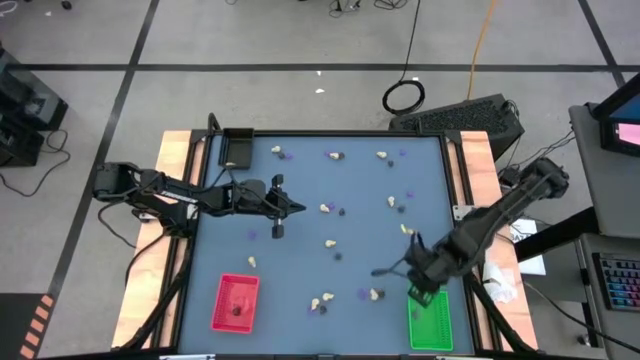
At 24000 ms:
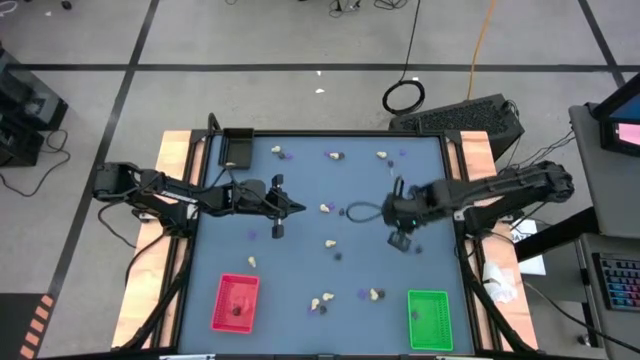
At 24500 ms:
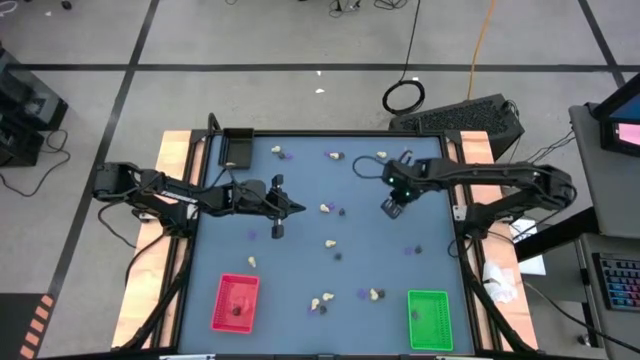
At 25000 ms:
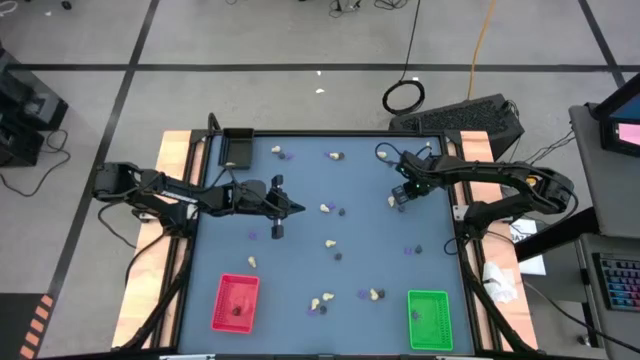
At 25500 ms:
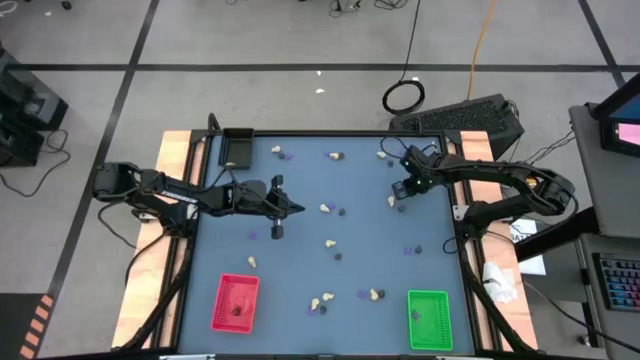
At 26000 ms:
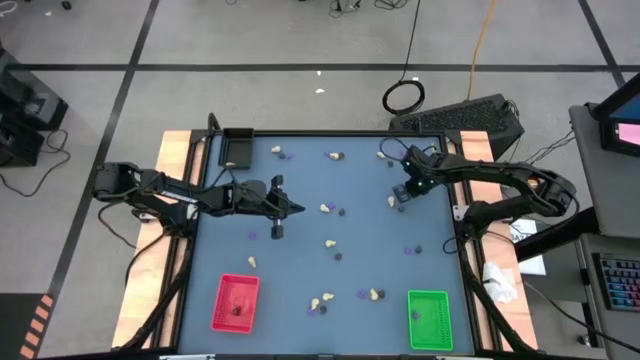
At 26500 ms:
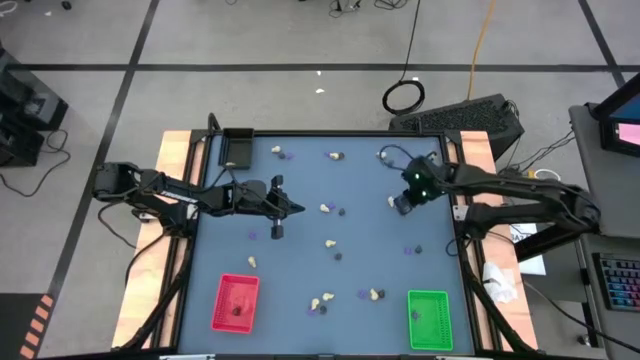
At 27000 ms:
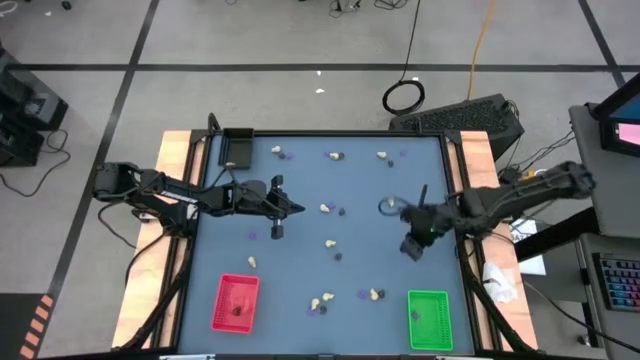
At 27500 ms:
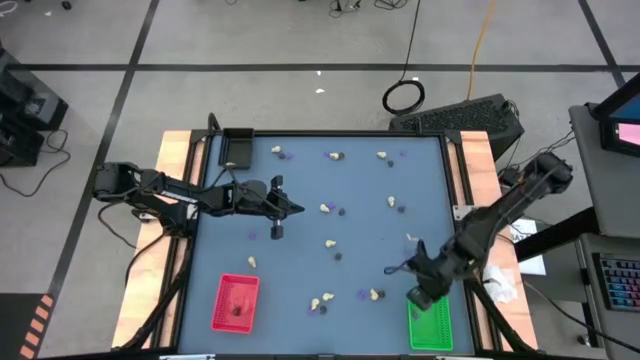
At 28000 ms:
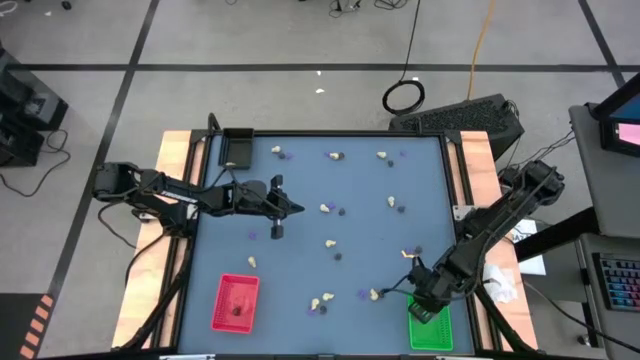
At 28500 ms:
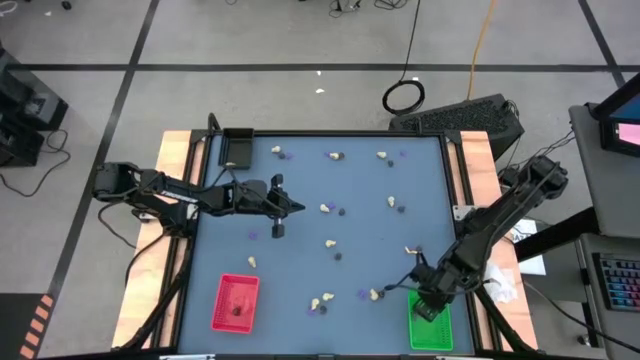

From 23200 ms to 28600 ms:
Task: Sort Halloween decoration
Put the violet spider toy into the green bin

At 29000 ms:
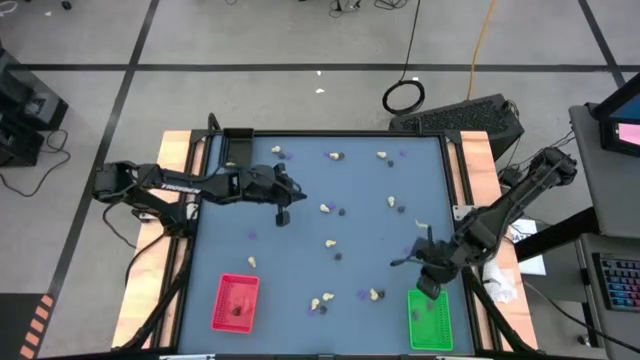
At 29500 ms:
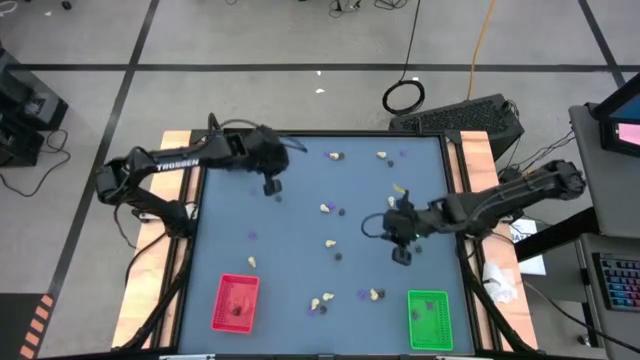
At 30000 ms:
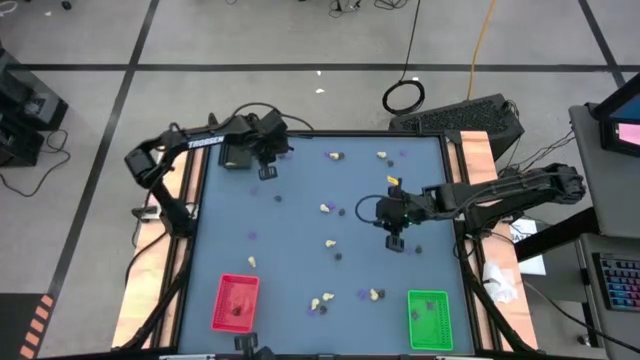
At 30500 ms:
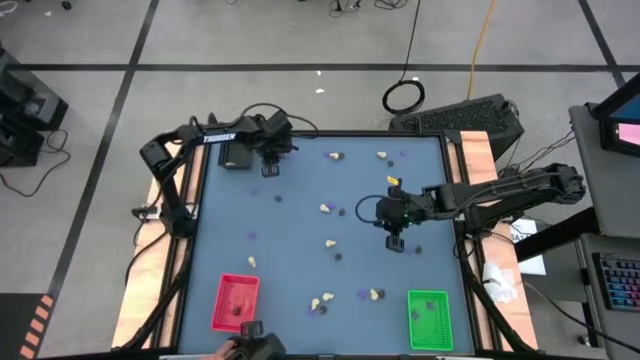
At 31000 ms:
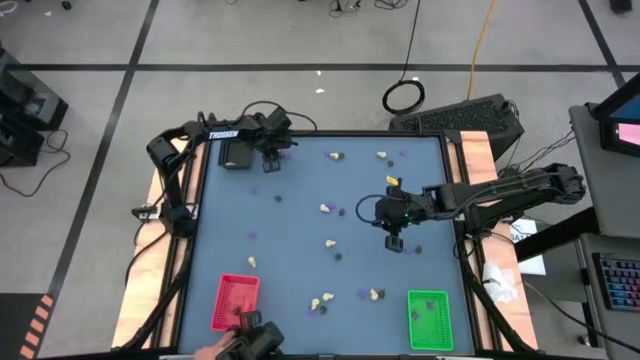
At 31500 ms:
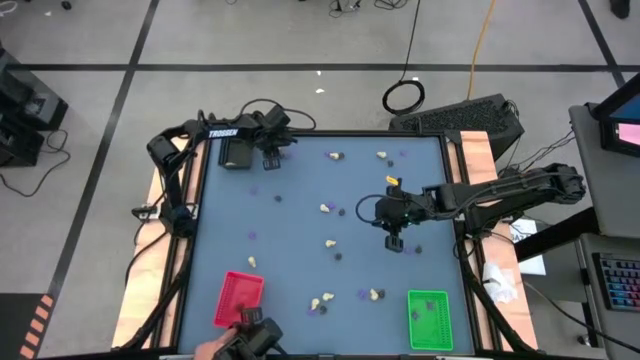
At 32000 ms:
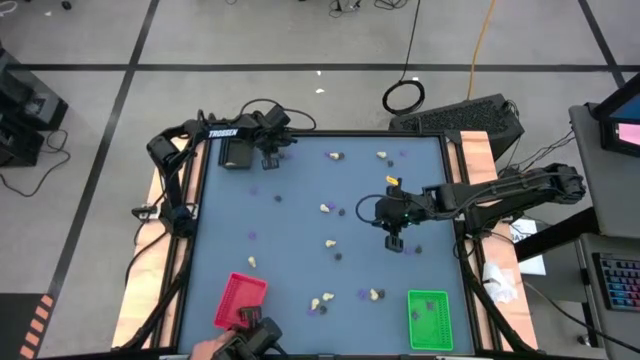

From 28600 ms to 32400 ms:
Put the white skull toy into the black bin

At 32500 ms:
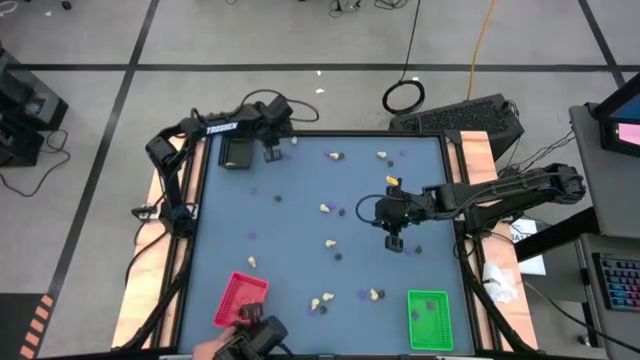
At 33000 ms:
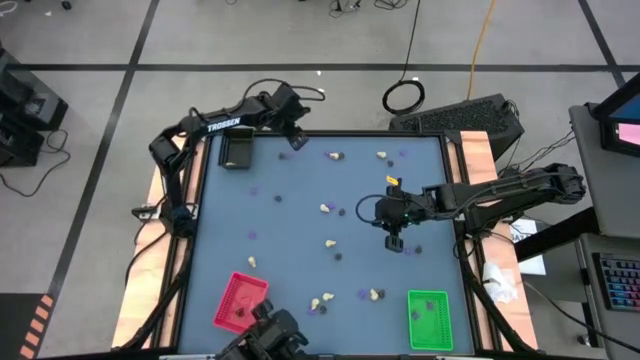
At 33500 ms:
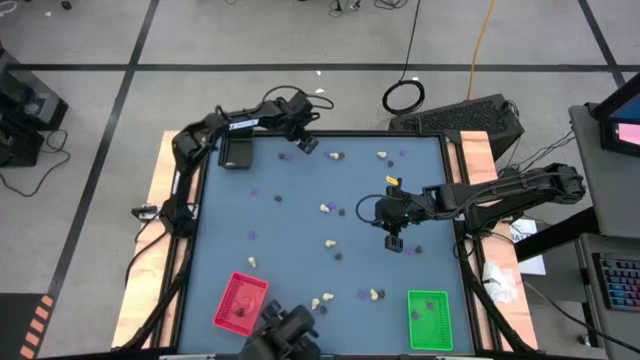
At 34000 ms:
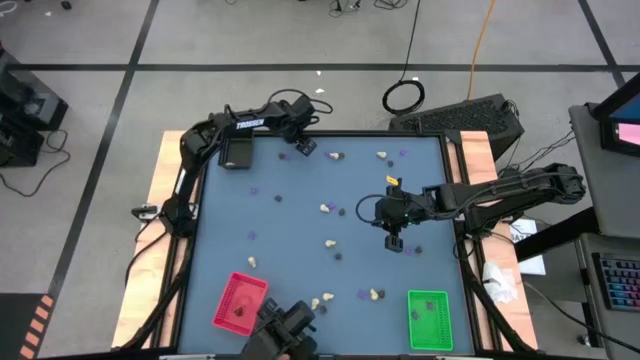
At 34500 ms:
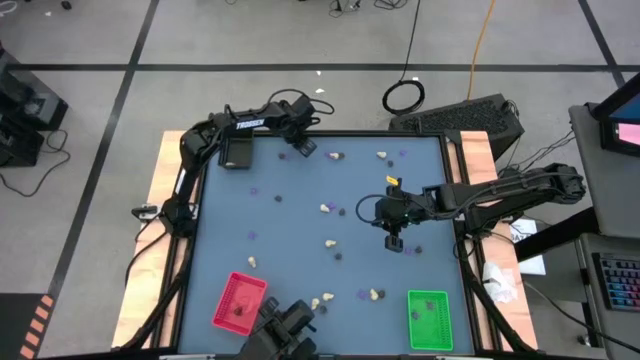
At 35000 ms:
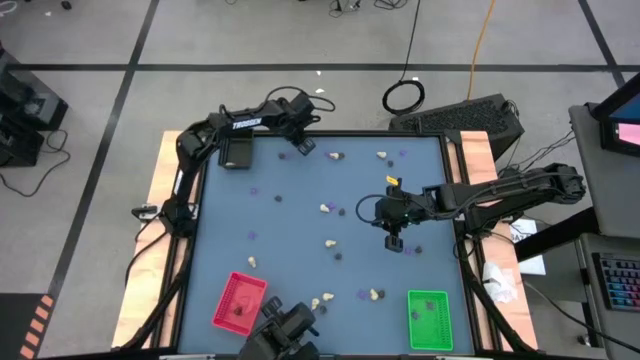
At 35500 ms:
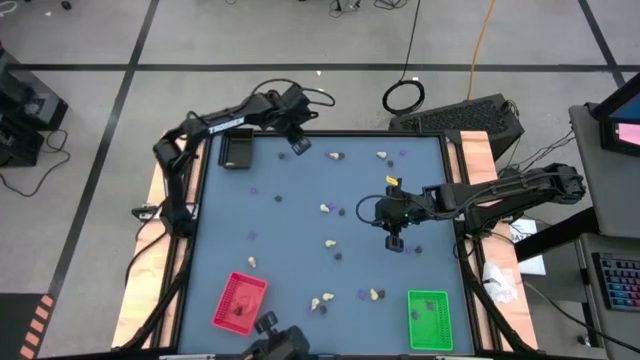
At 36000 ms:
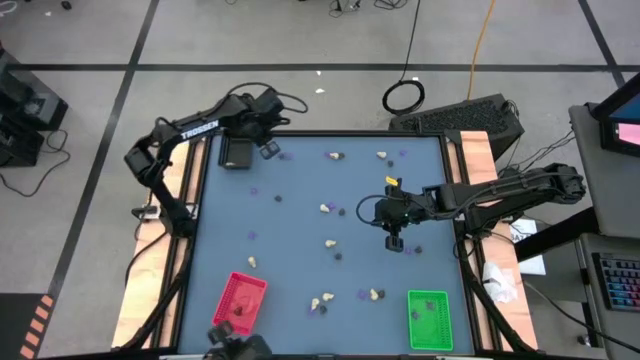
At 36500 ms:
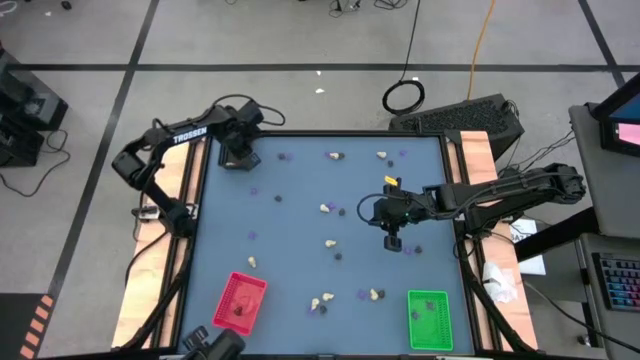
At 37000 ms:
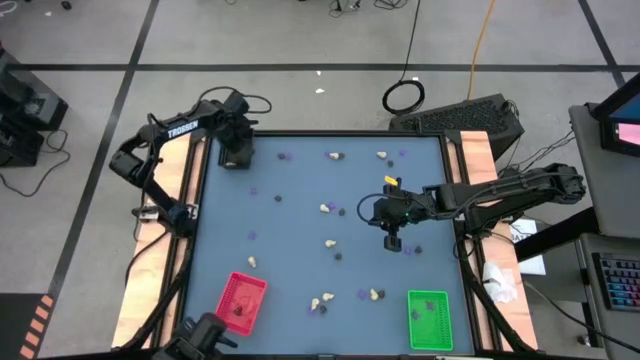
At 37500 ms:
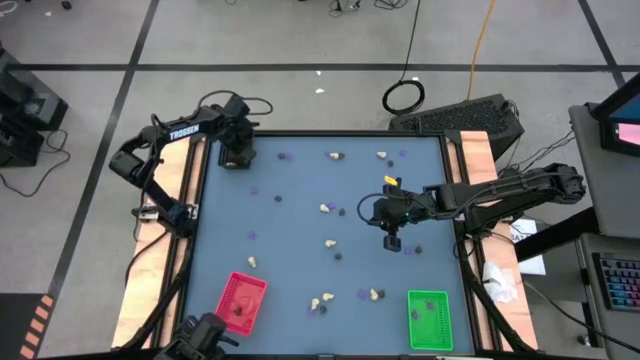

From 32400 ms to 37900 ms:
Put the white skull toy into the black bin

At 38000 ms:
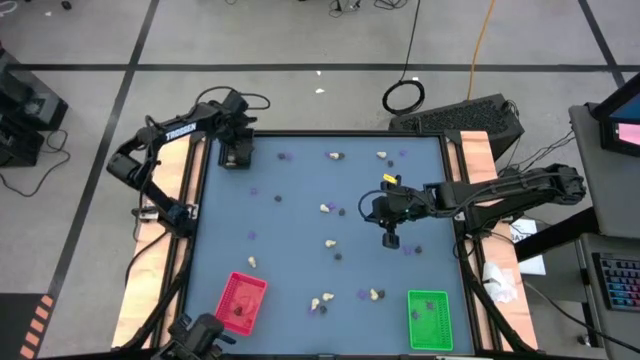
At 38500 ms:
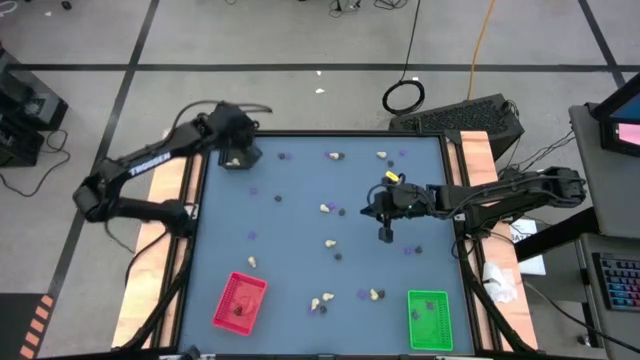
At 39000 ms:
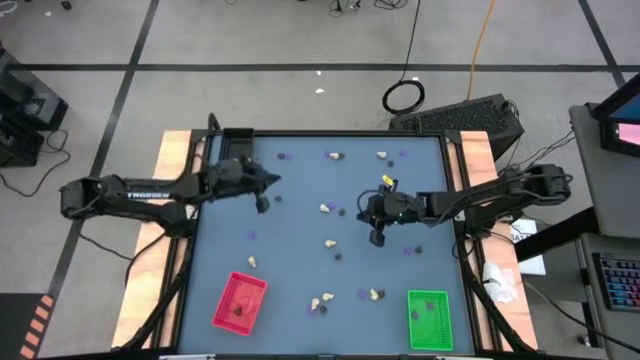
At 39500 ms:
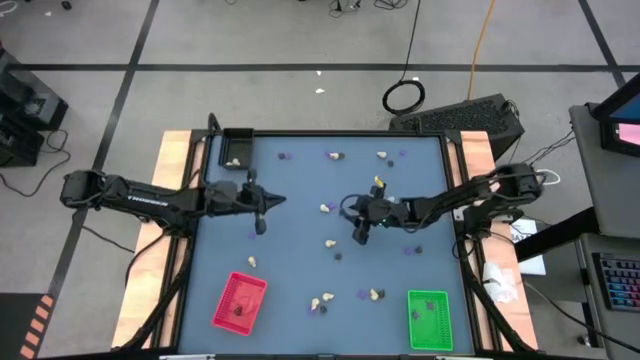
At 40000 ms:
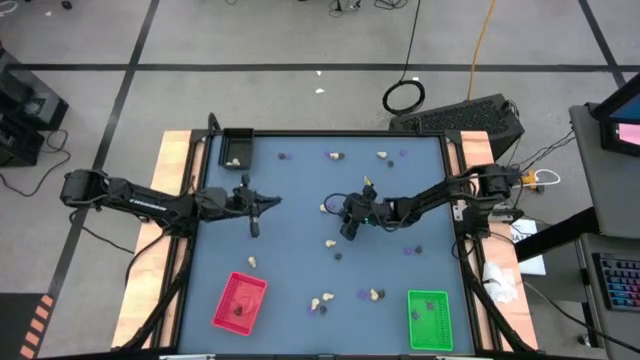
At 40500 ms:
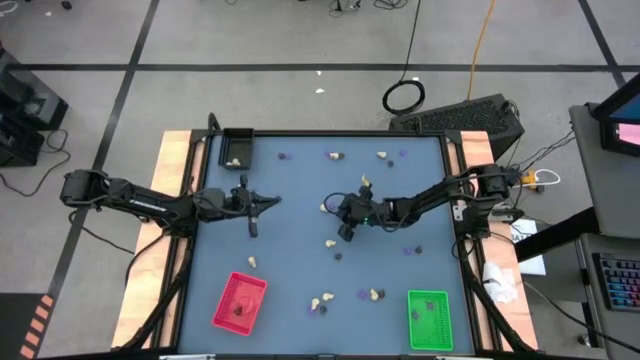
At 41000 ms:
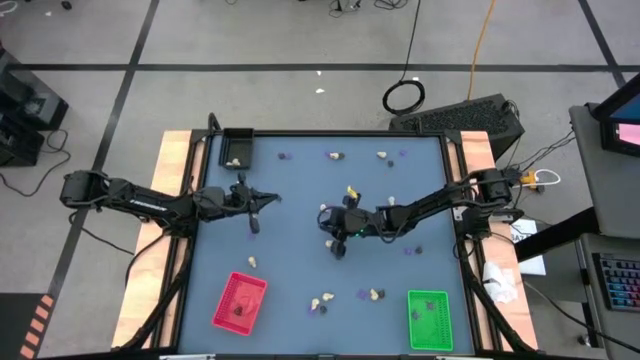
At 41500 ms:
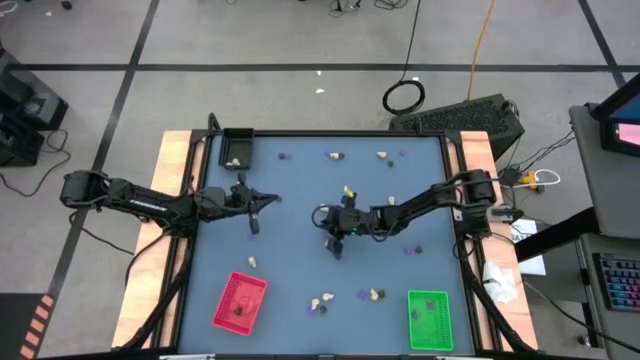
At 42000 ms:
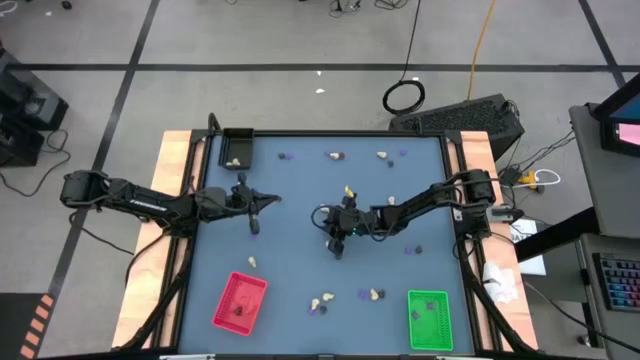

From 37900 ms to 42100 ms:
Put the black skull toy into the red bin

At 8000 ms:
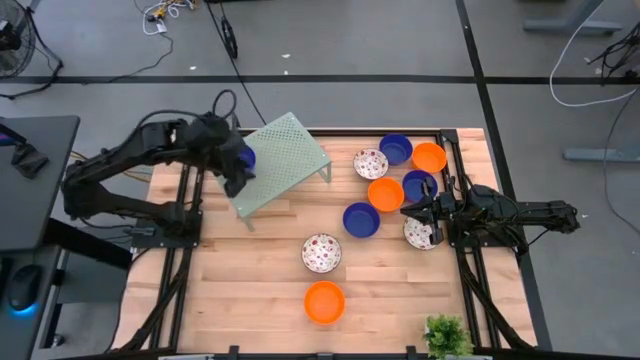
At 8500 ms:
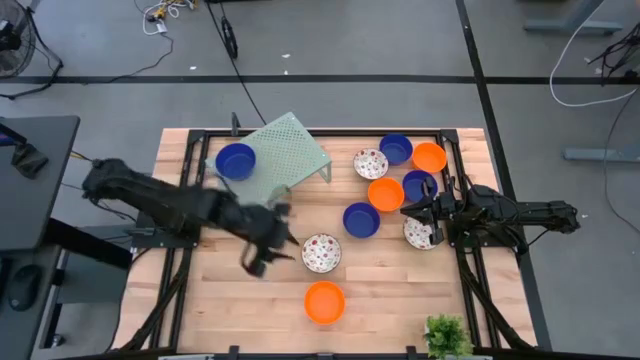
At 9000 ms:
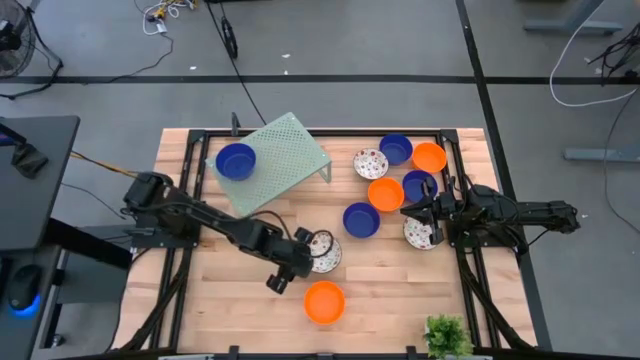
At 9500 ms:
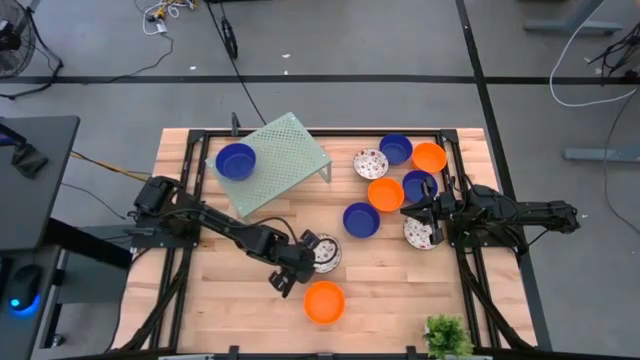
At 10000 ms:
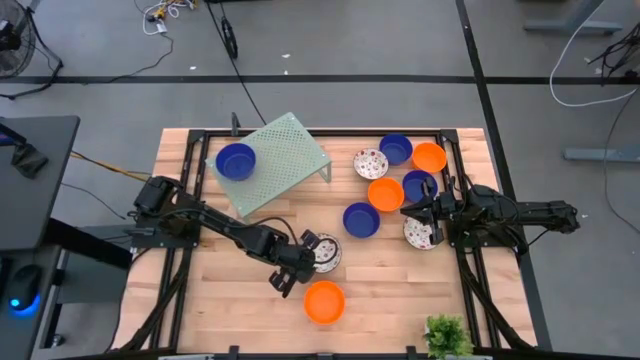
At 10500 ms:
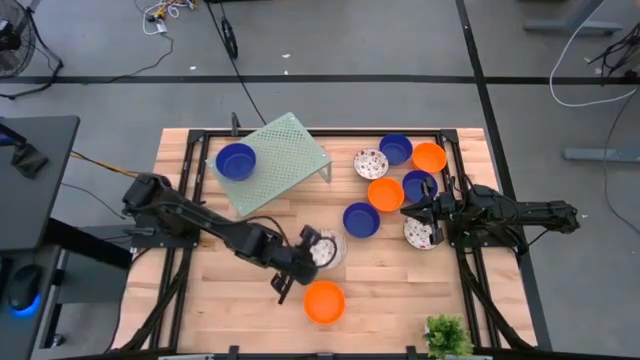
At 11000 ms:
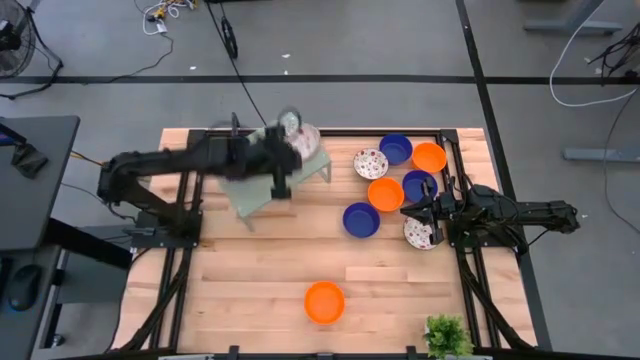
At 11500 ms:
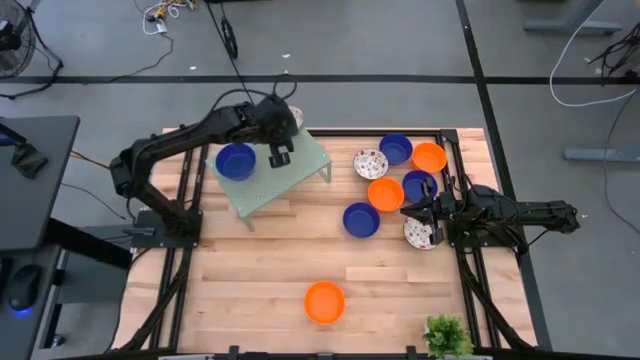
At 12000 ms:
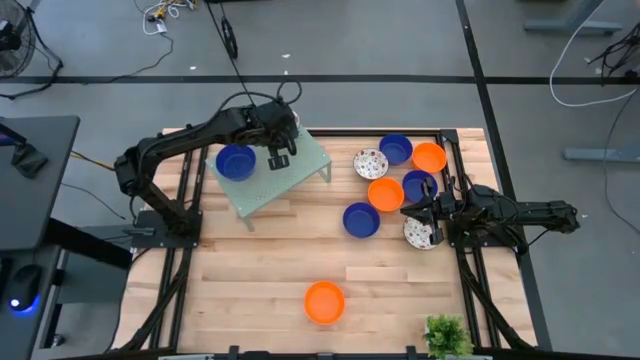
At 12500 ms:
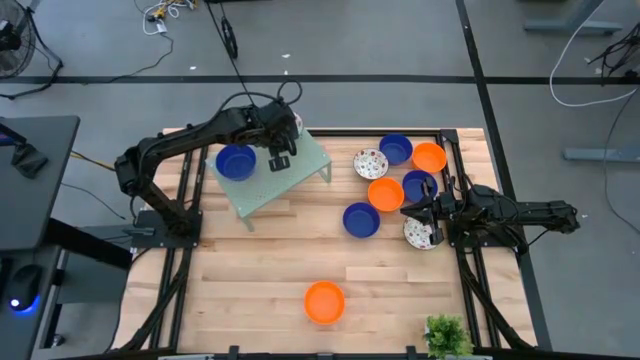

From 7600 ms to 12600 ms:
Task: Pick & Place Mini bowls
Put the green bowl on the shelf
